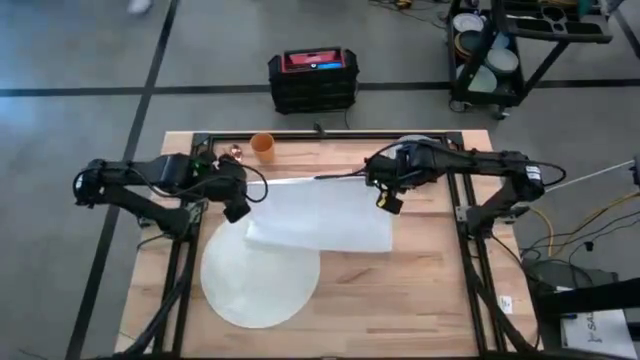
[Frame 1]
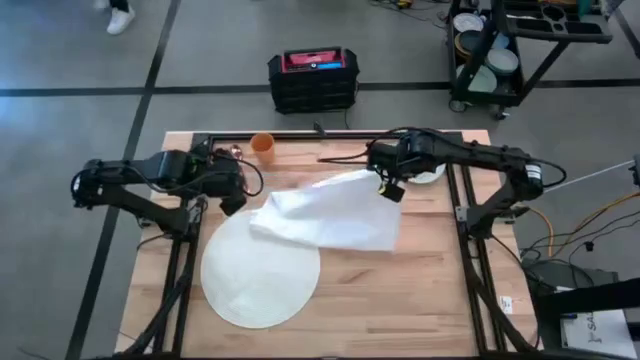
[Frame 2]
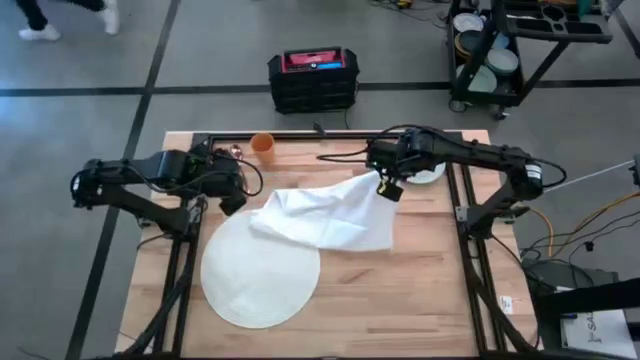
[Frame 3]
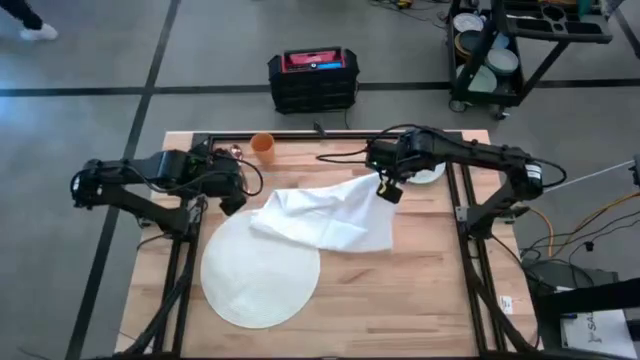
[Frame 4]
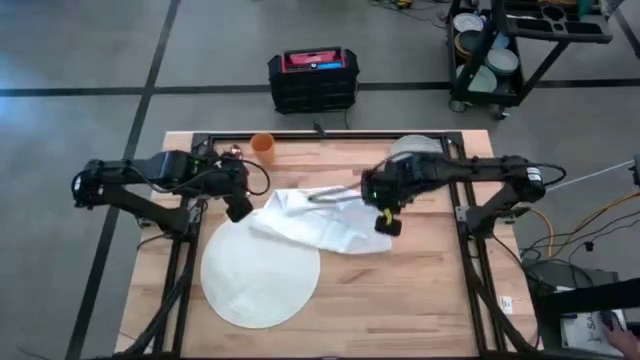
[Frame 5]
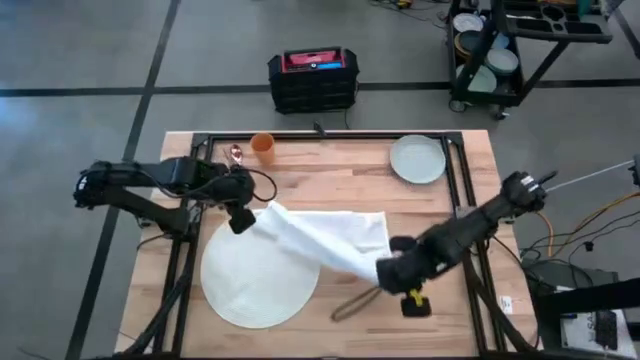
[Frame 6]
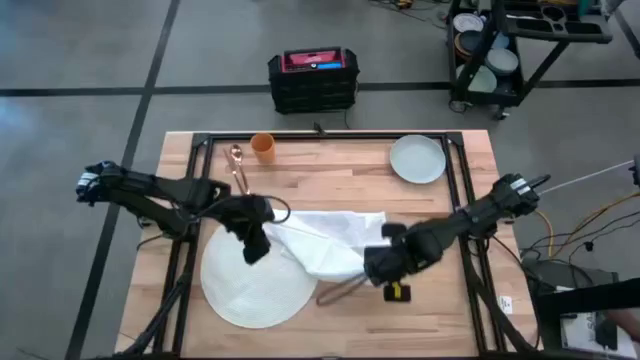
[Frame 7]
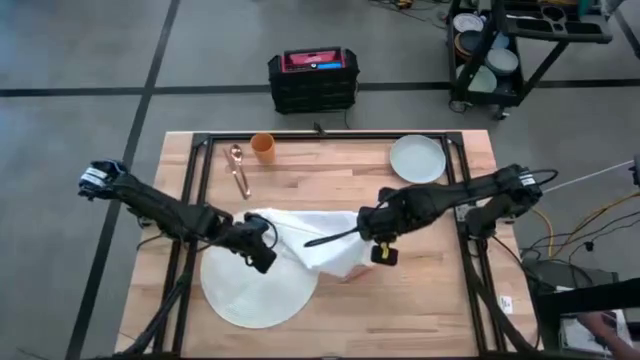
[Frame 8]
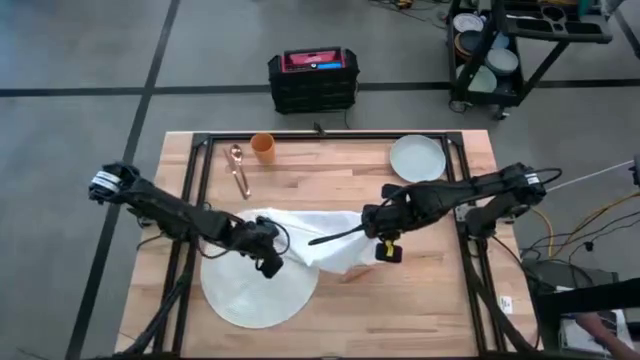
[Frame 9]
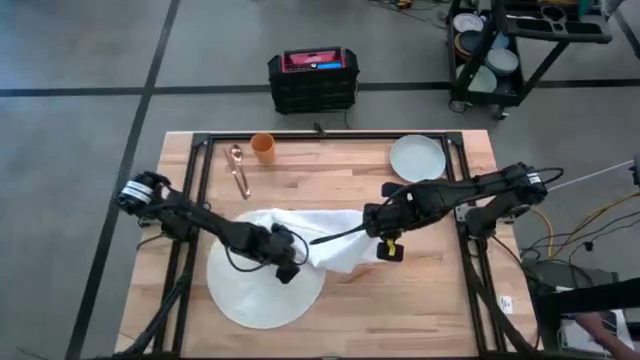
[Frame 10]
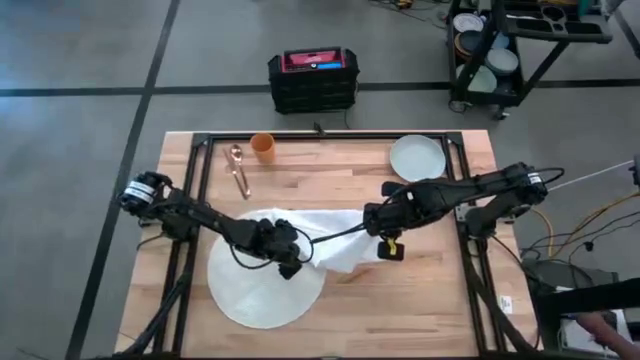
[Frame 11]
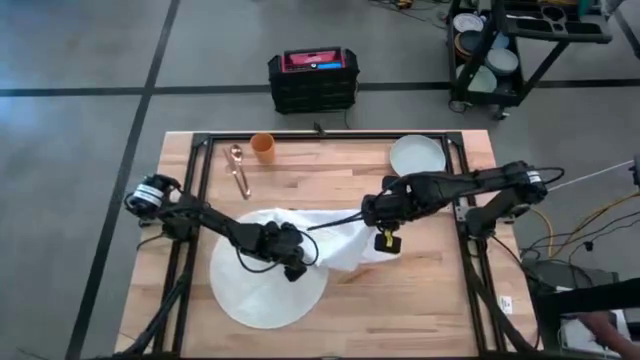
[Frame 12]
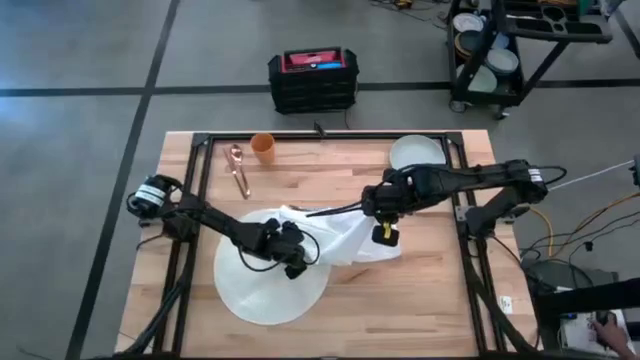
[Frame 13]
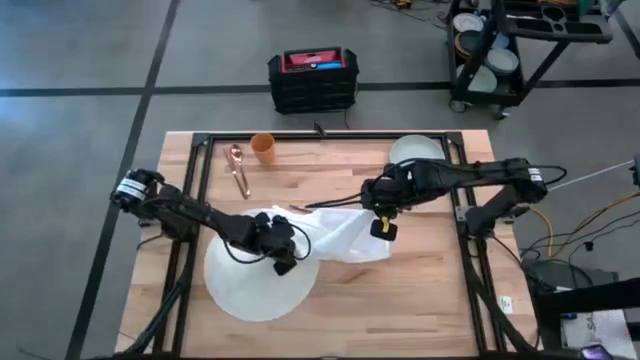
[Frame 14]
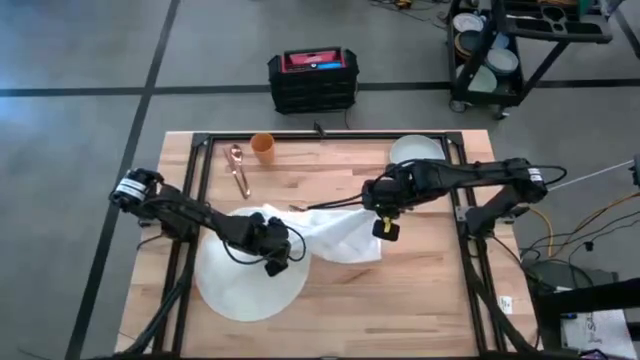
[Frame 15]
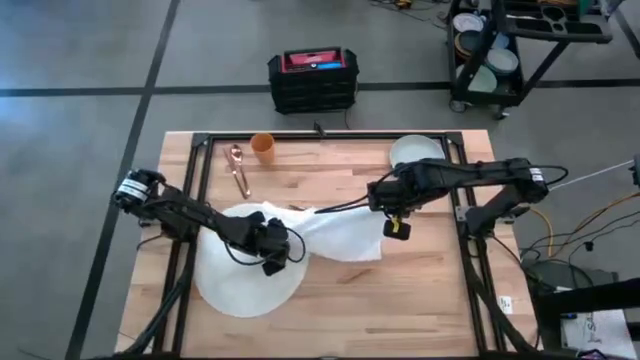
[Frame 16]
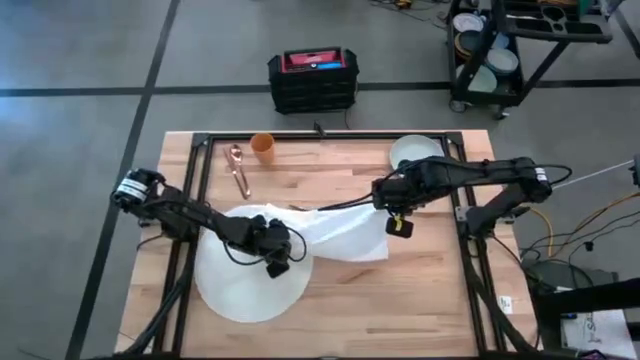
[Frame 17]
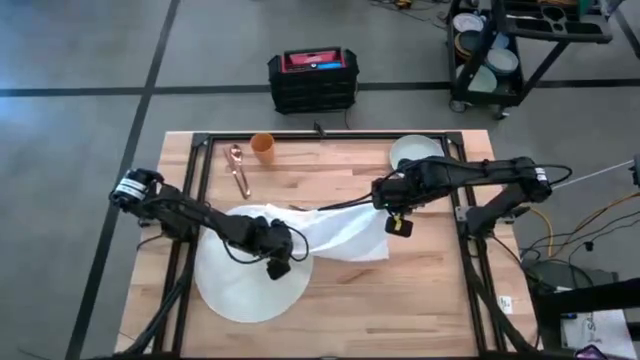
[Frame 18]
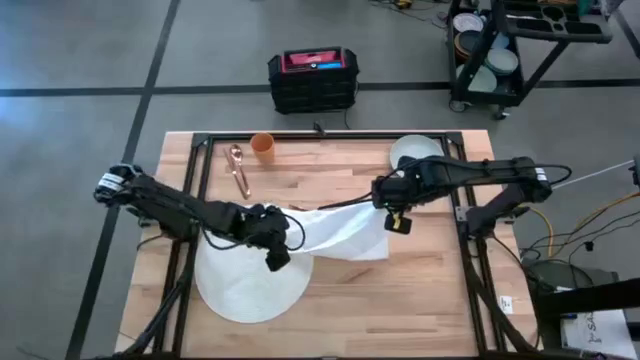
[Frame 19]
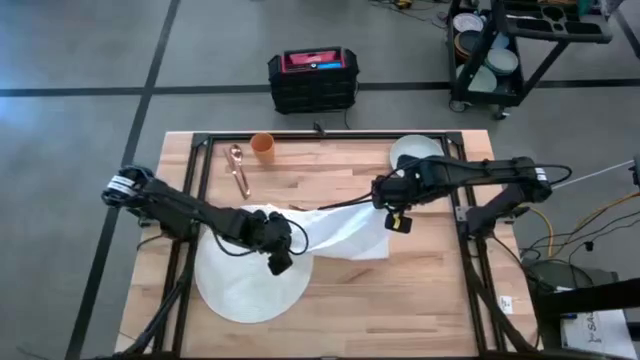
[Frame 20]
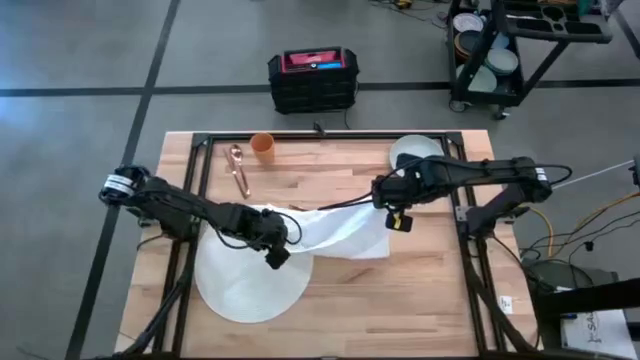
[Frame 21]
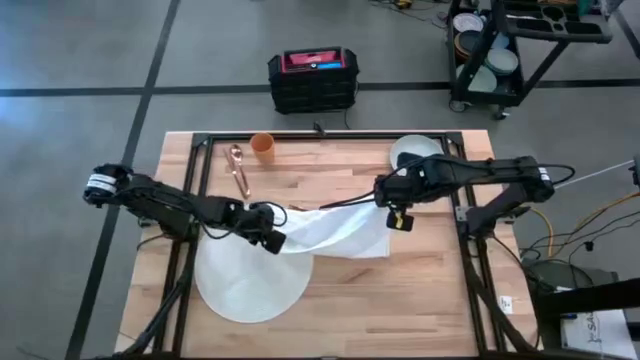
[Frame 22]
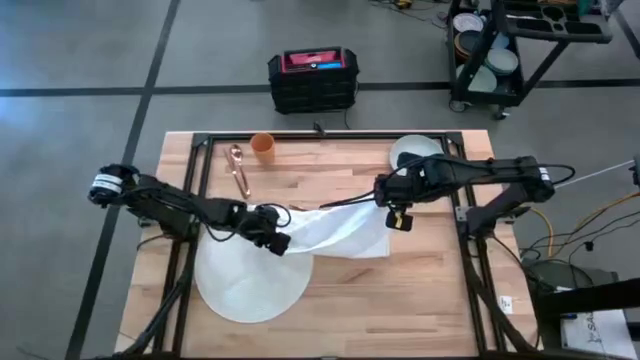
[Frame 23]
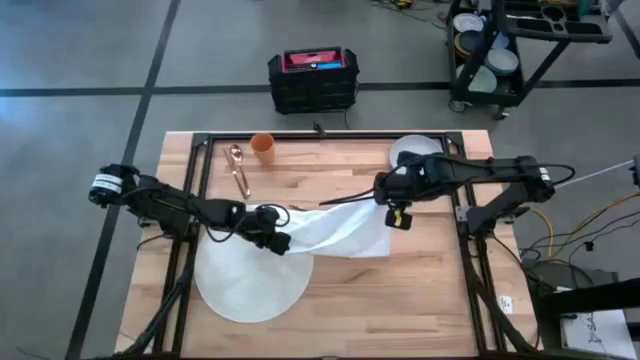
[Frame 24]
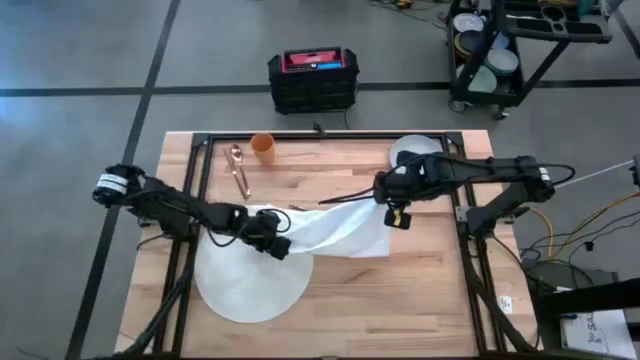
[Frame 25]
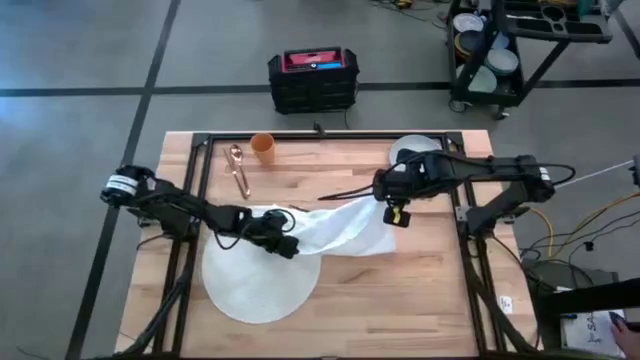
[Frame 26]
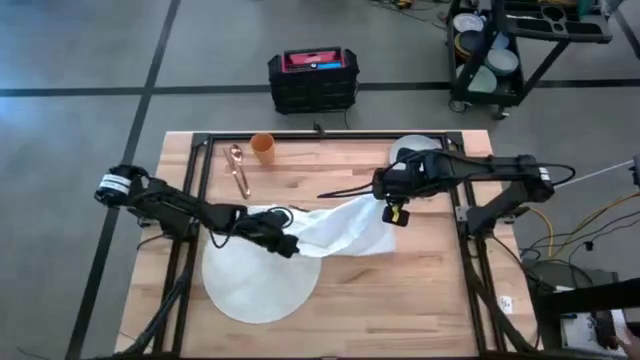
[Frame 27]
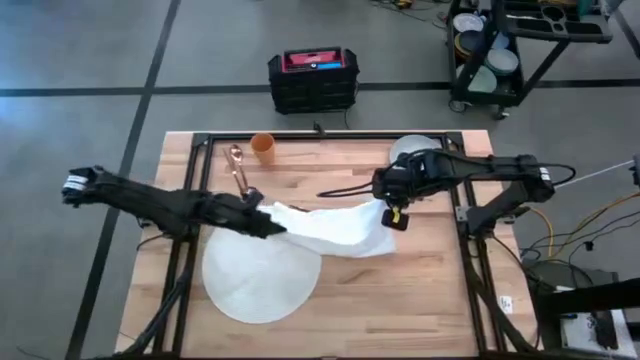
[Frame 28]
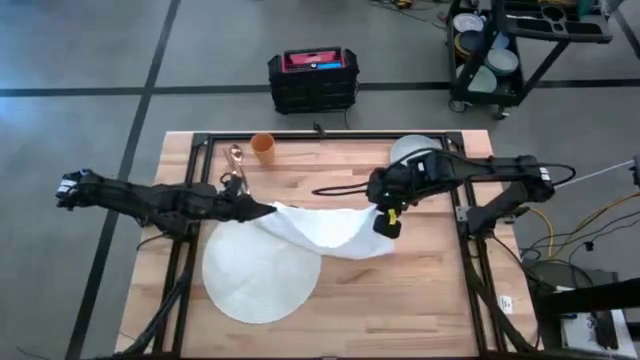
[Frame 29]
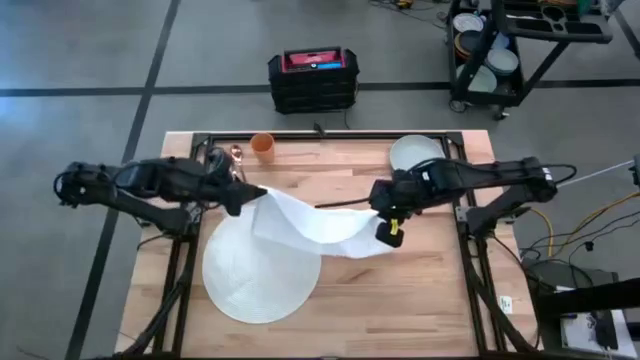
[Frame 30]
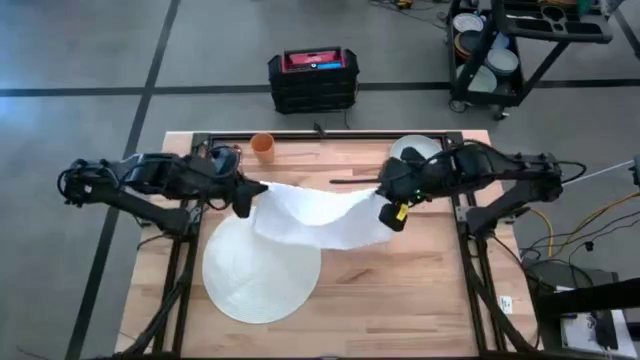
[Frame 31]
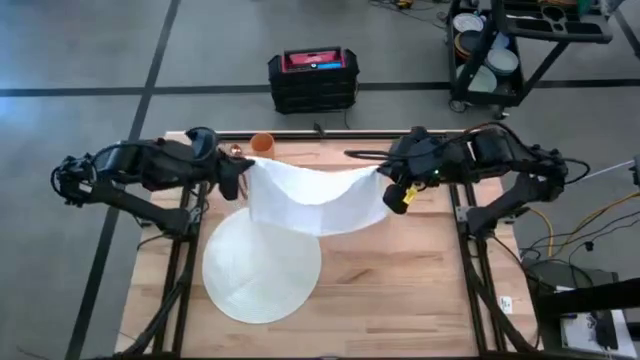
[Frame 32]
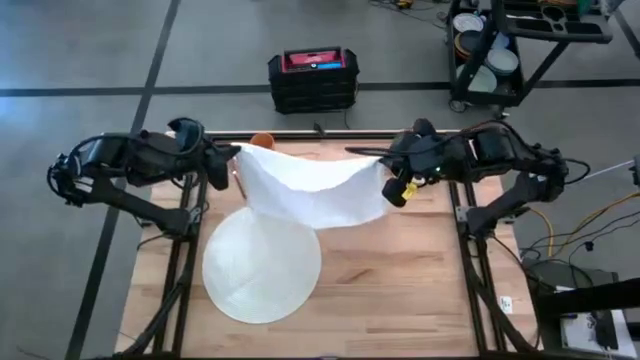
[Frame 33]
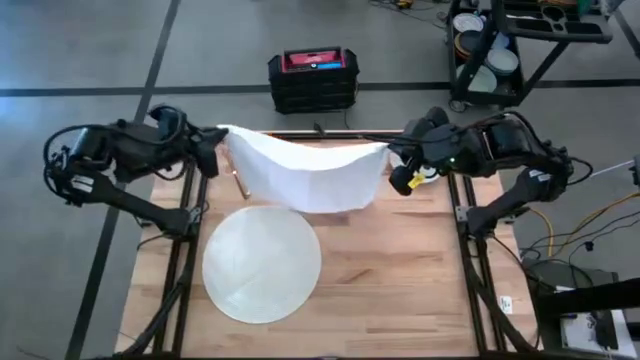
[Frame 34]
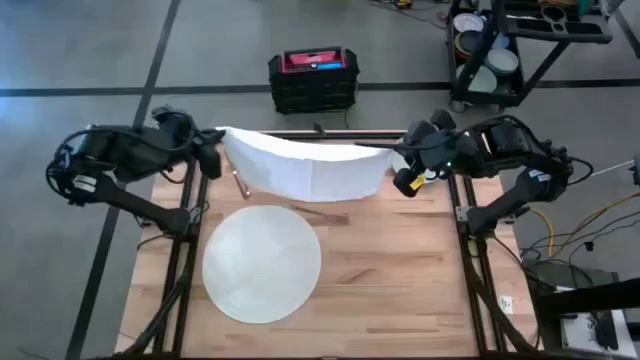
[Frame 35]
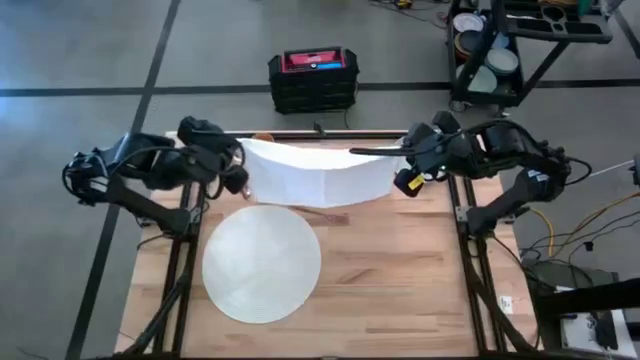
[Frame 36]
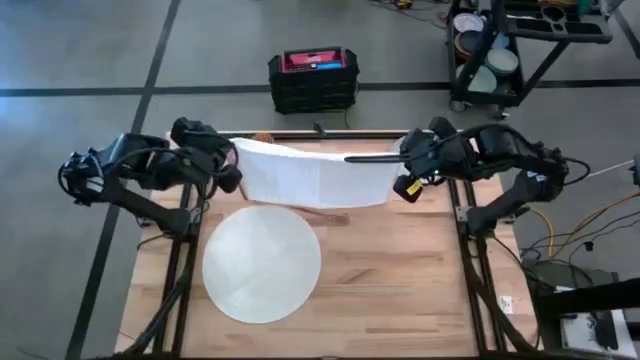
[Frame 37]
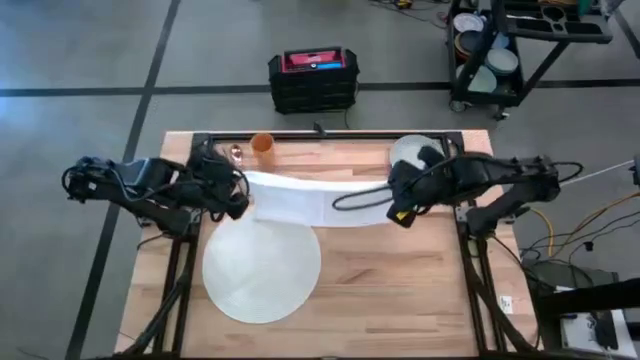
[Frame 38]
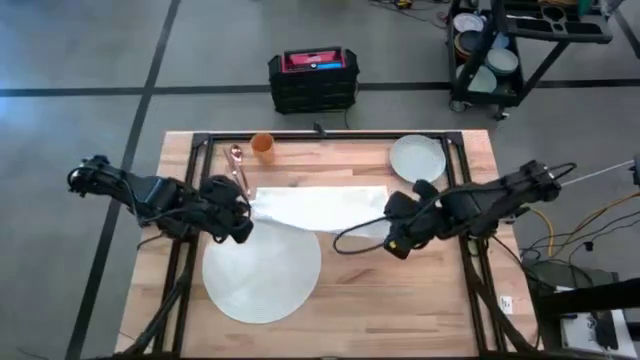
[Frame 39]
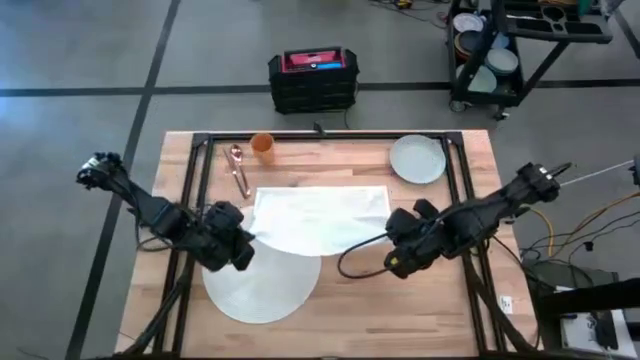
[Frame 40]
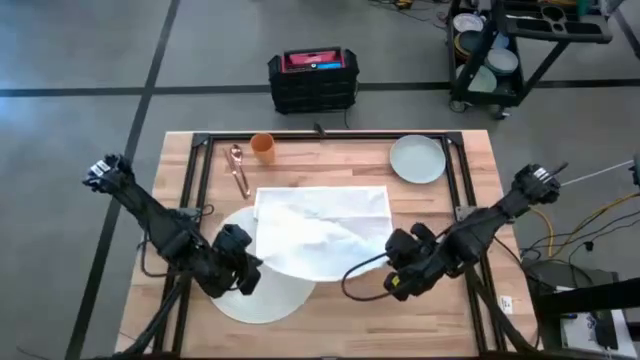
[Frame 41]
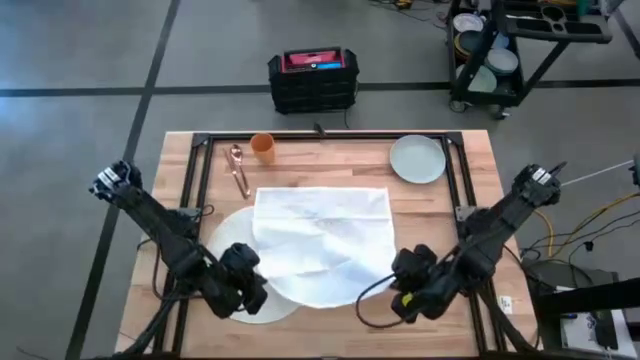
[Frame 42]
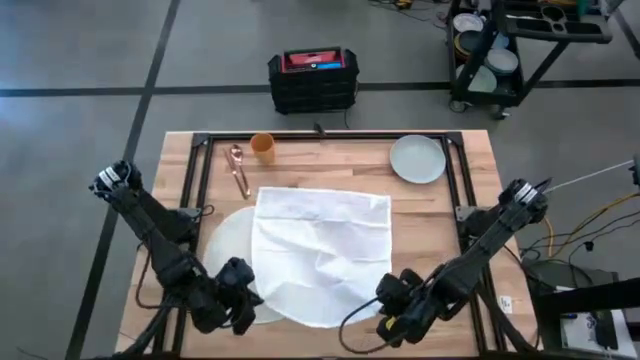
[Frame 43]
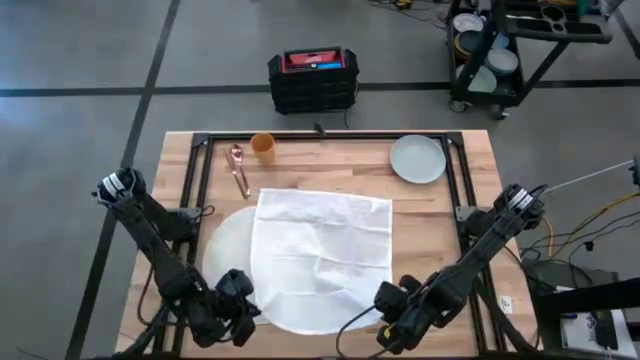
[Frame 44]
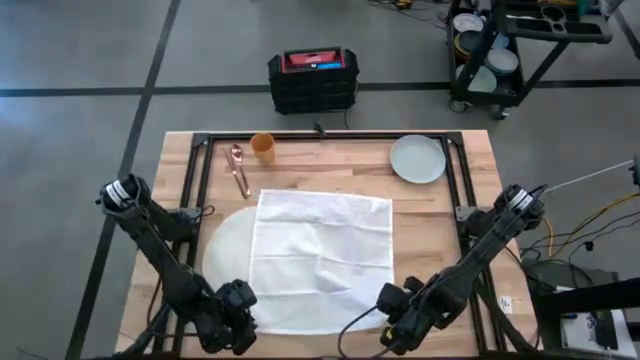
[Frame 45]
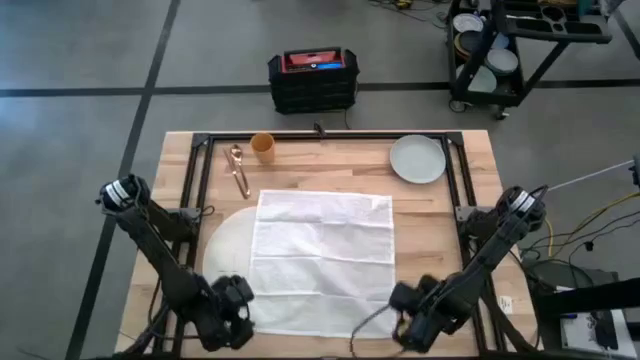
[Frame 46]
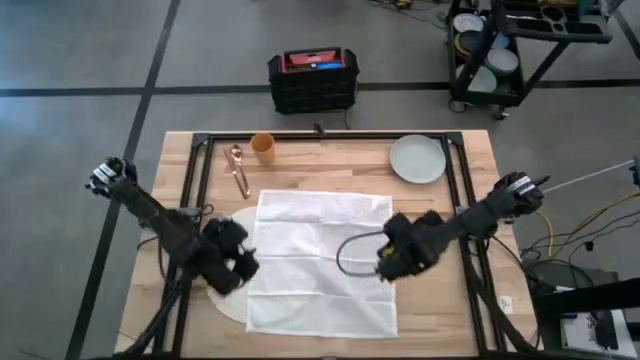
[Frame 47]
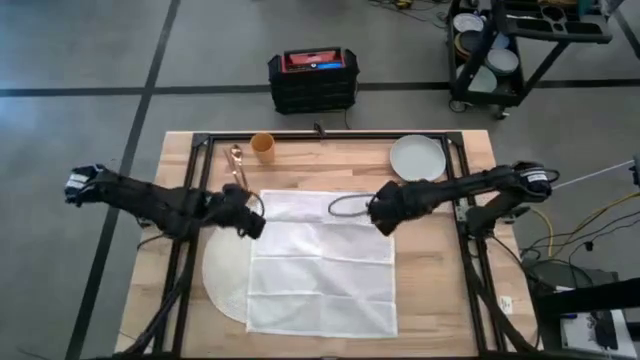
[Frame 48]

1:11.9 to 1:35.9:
Task: Set table place
Fold the white napkin
